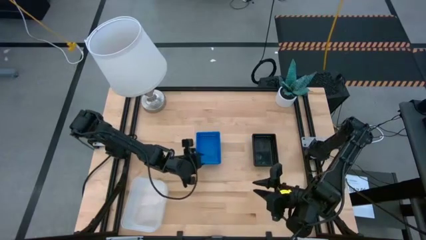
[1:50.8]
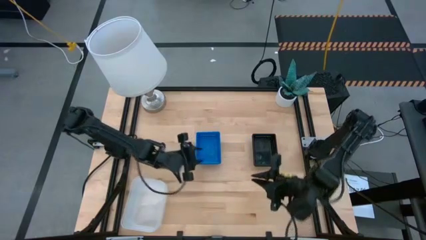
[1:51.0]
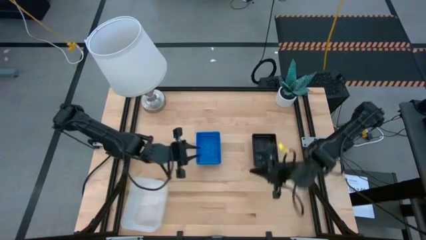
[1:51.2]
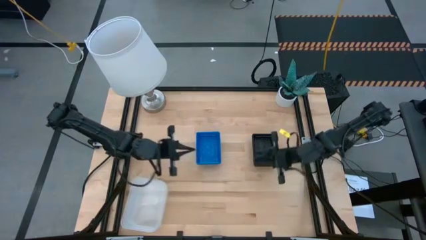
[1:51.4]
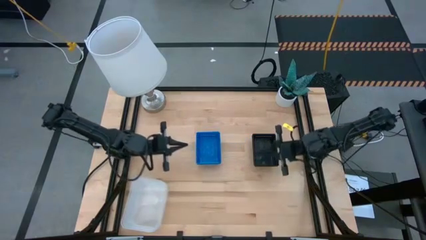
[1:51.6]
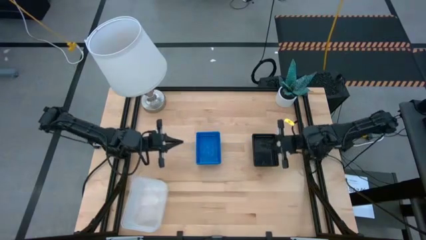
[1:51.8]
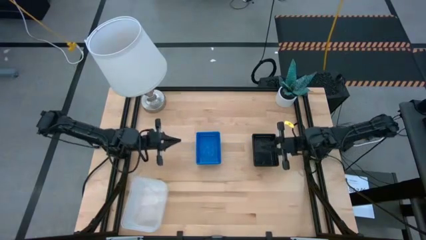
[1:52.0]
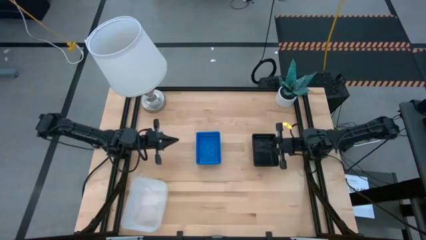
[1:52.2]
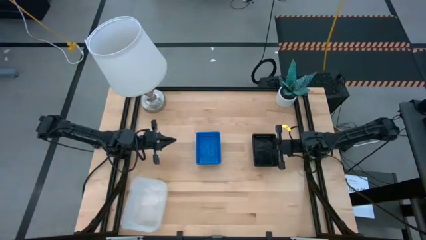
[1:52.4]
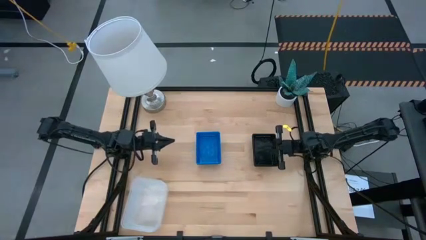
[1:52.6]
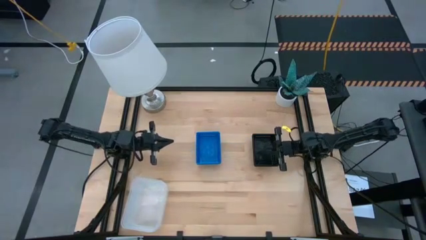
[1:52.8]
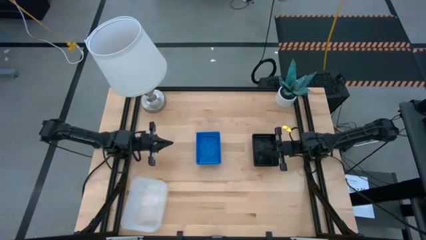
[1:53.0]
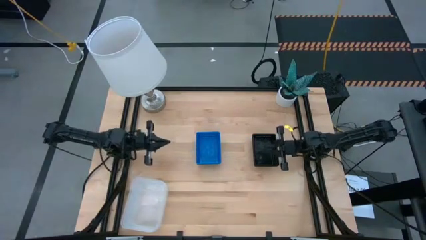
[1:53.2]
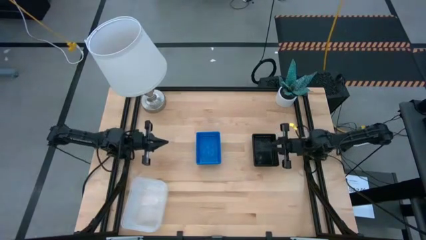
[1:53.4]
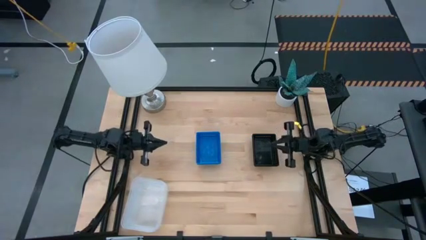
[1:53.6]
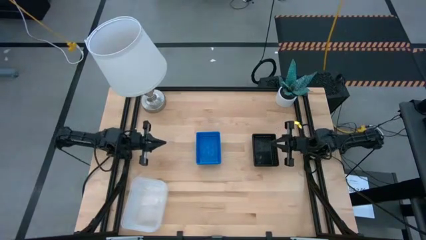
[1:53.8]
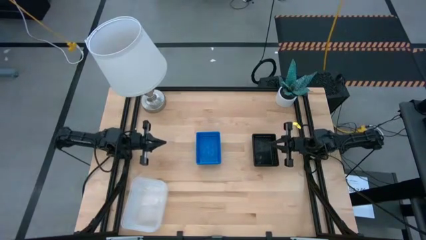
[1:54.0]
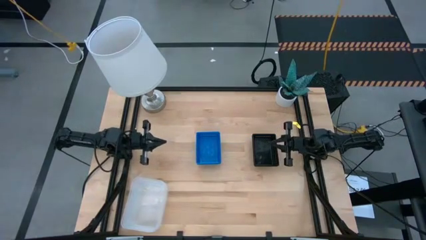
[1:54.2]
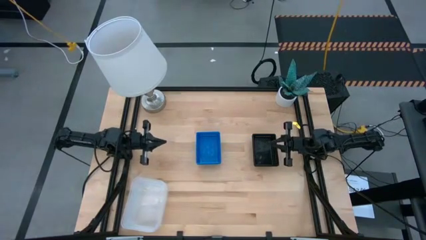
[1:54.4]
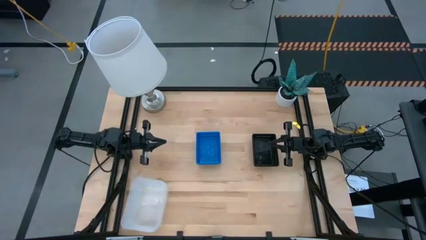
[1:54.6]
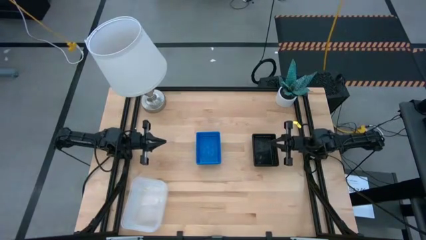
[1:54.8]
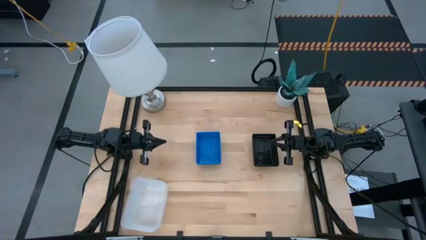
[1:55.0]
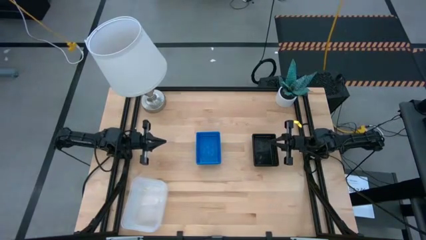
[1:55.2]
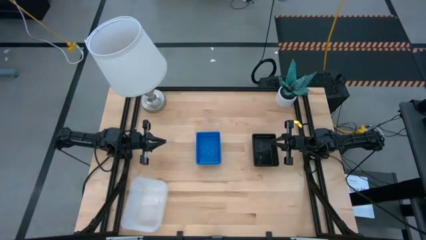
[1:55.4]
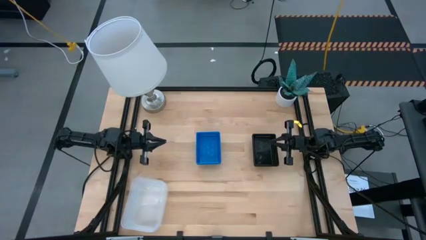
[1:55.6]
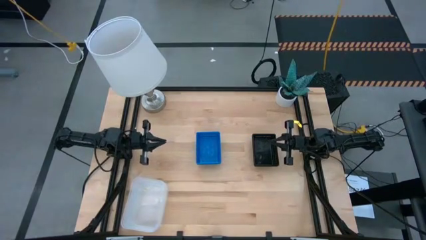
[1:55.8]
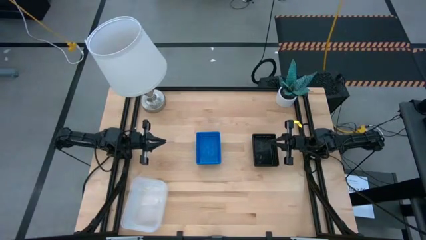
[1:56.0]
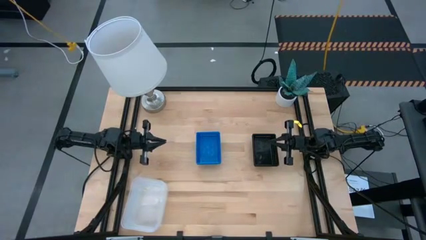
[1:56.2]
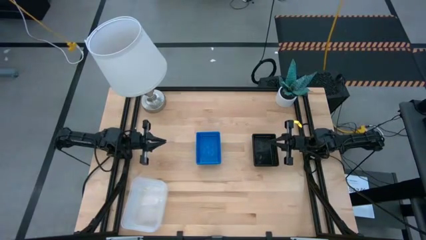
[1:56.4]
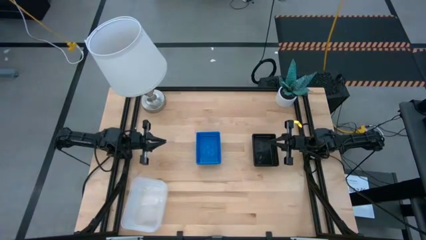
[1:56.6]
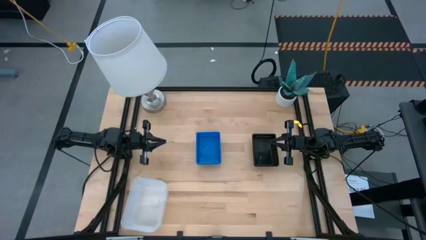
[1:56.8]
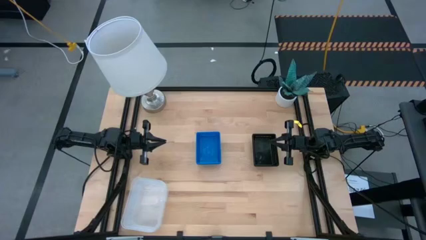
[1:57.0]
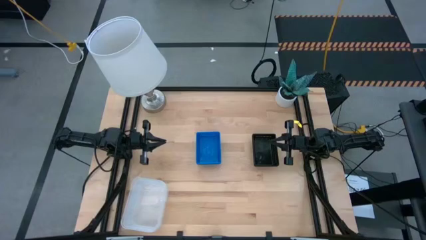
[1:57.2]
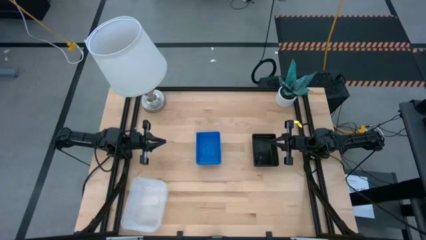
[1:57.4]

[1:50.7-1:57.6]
Return to Home Position

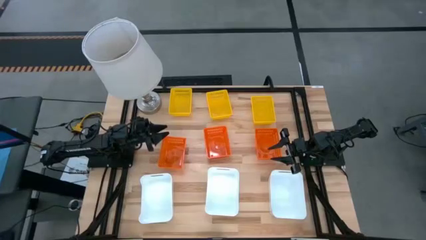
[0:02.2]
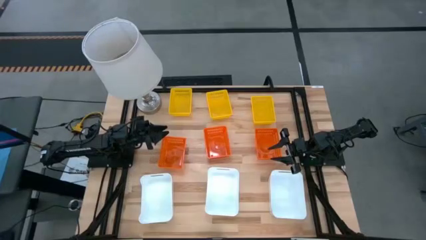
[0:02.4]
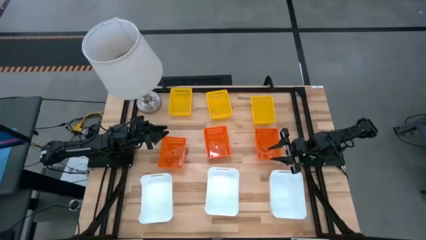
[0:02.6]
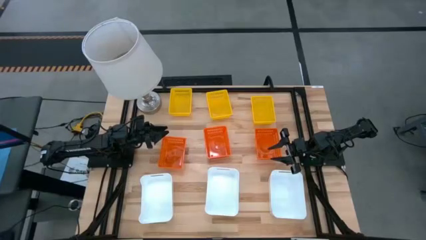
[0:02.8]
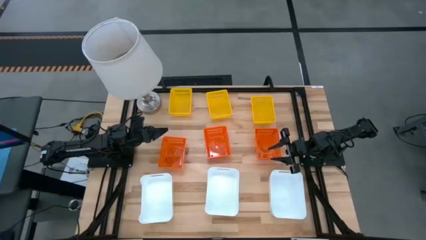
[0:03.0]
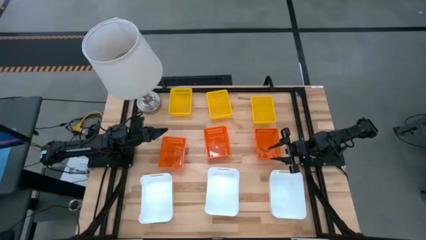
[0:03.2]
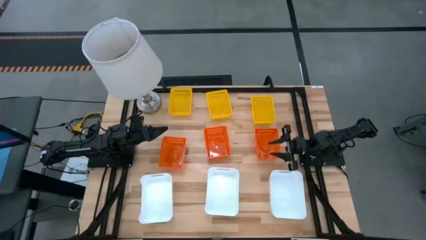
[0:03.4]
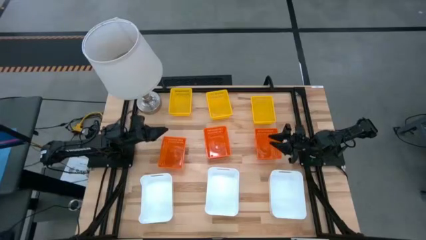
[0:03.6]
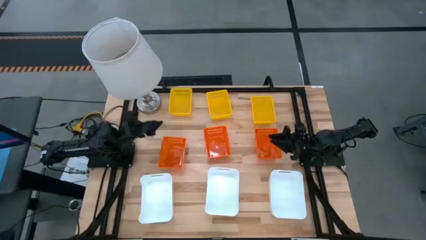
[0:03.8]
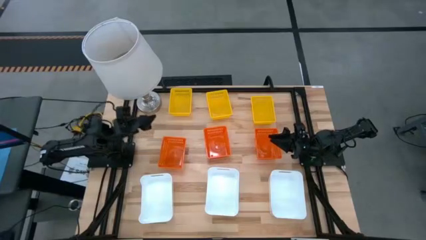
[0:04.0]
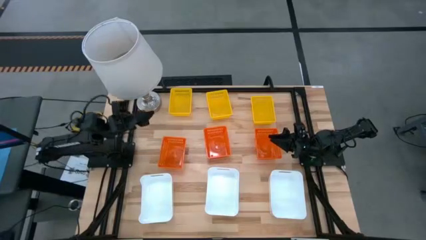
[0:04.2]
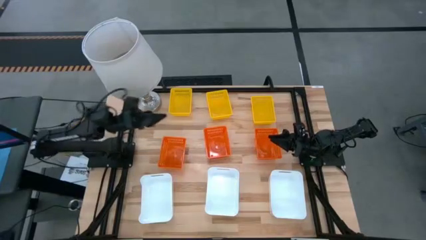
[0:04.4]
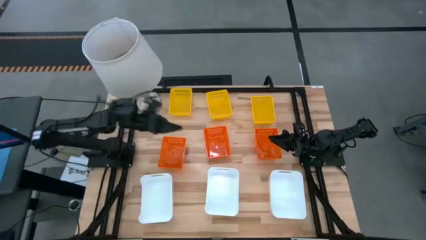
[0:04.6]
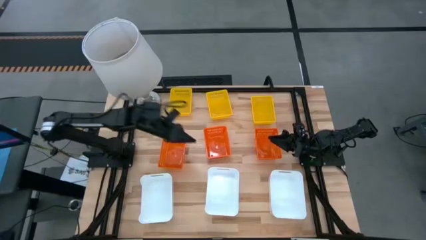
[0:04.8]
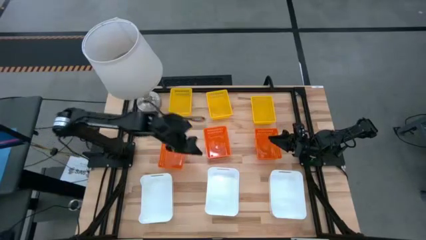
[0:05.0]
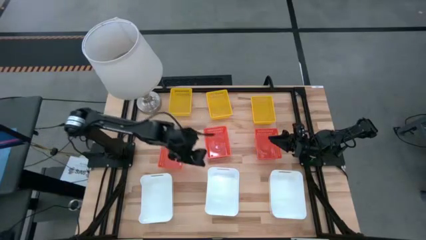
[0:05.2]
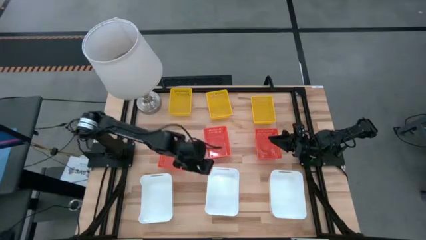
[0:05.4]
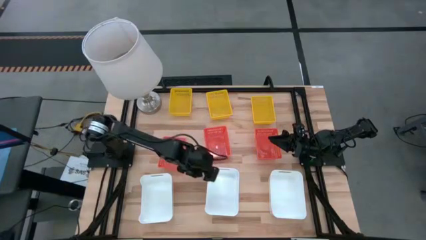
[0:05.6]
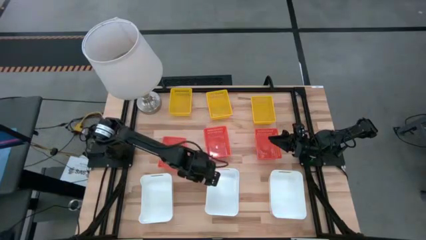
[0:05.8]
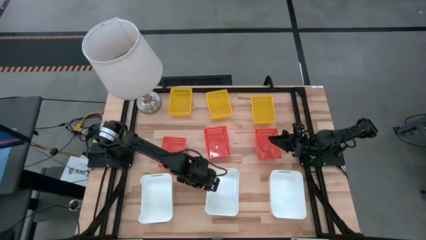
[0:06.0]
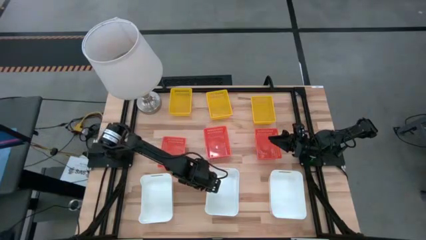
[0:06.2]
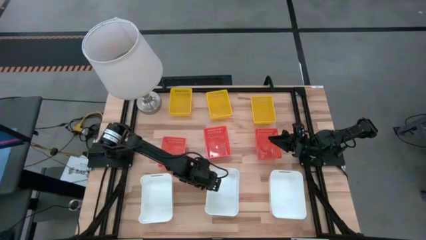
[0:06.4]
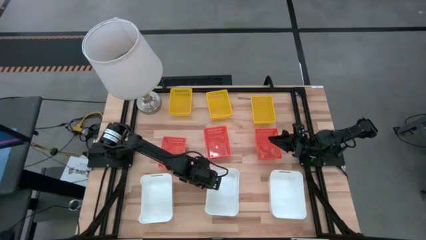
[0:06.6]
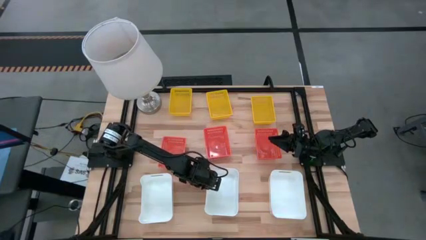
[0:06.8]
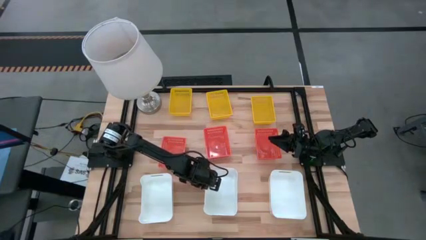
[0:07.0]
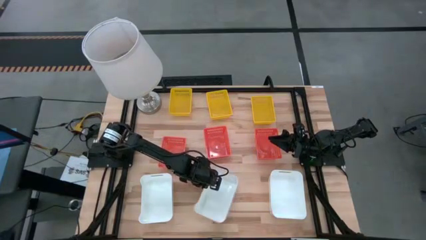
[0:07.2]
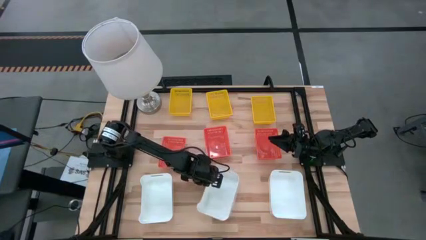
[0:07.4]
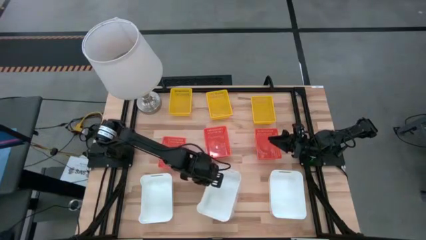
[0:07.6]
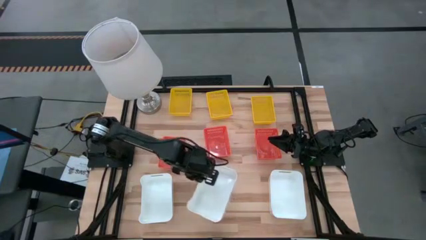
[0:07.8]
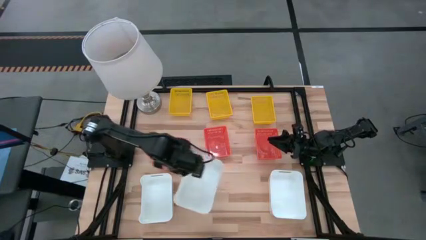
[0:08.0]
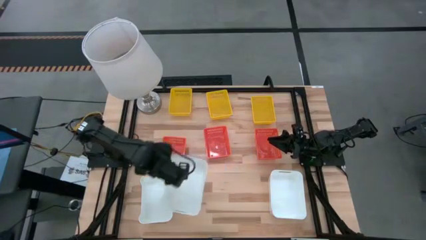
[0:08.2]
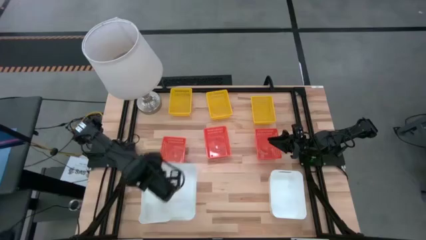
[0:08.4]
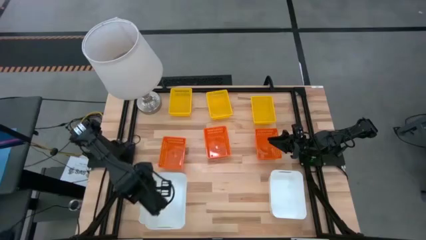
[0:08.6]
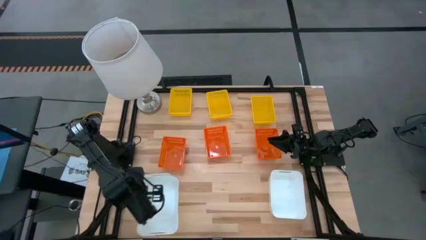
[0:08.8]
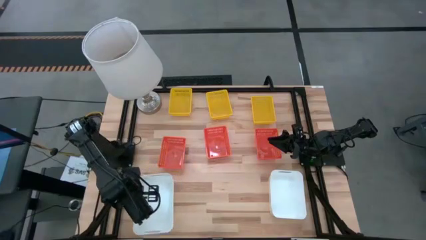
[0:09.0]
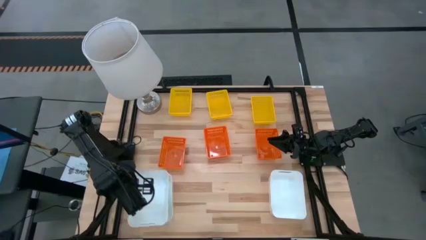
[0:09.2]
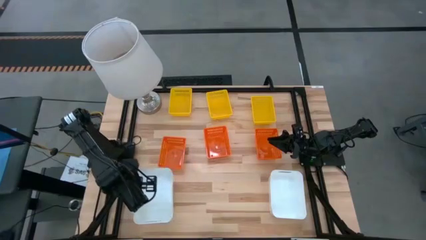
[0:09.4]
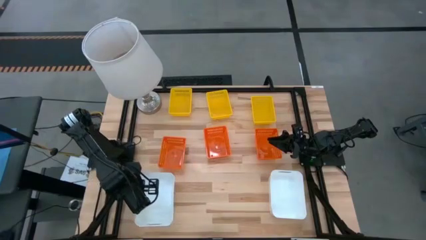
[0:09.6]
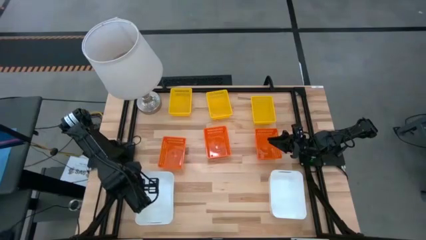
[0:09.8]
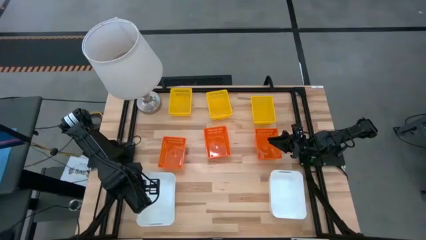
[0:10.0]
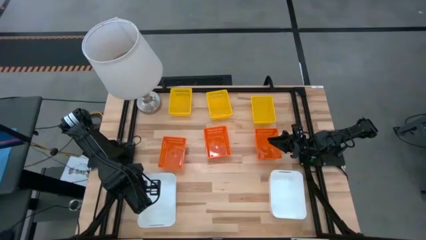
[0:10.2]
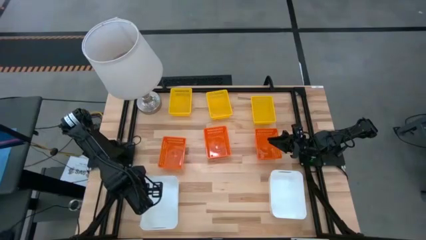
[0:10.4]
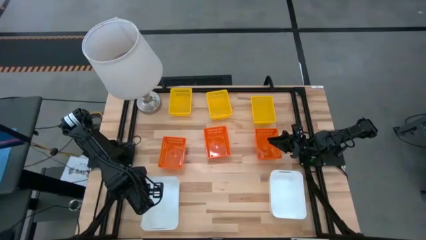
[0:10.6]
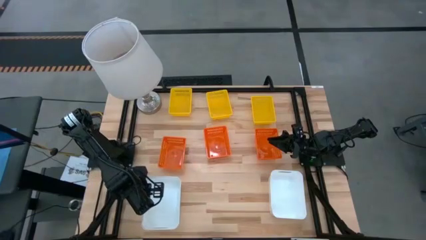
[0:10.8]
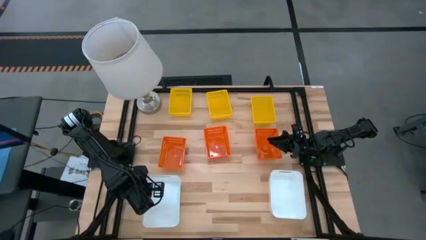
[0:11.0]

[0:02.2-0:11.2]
Stack the middle white bin on the left white bin
